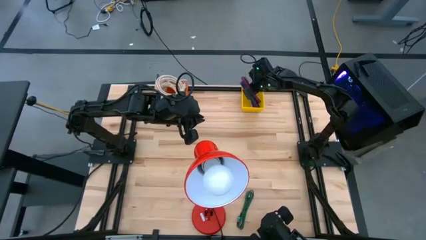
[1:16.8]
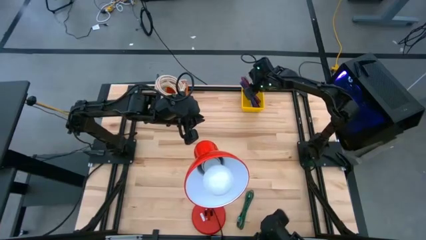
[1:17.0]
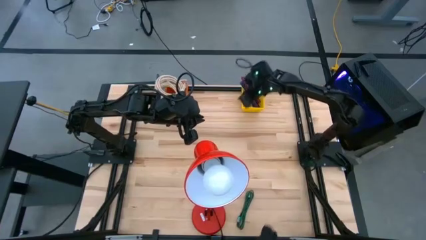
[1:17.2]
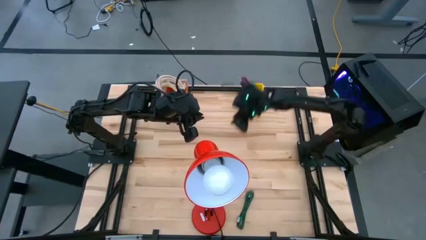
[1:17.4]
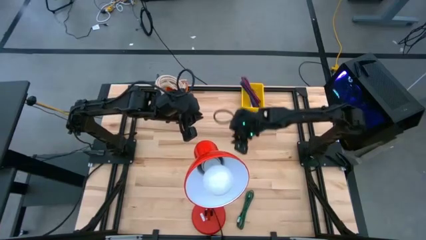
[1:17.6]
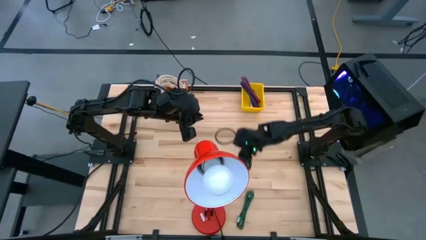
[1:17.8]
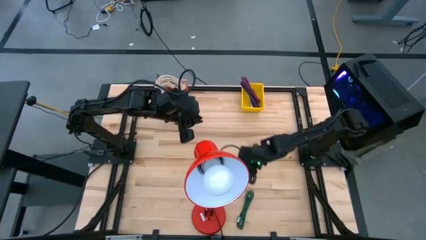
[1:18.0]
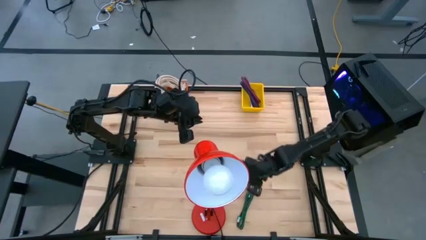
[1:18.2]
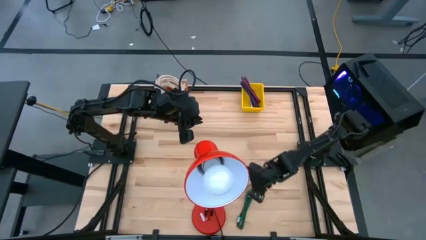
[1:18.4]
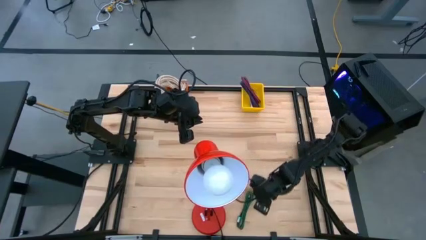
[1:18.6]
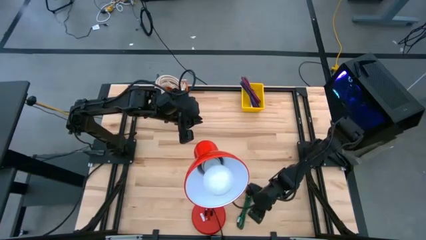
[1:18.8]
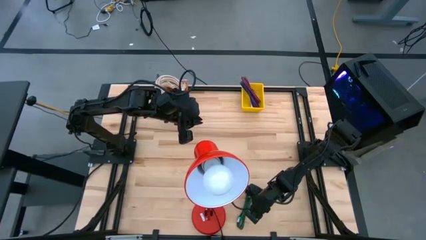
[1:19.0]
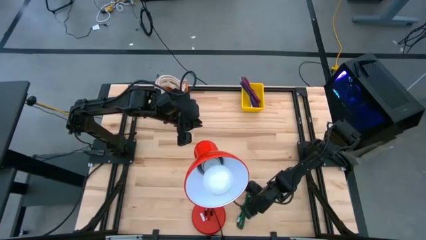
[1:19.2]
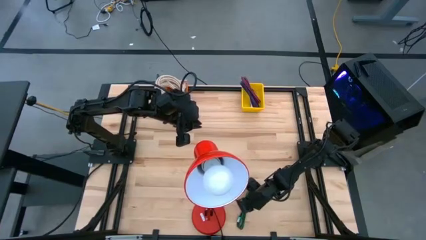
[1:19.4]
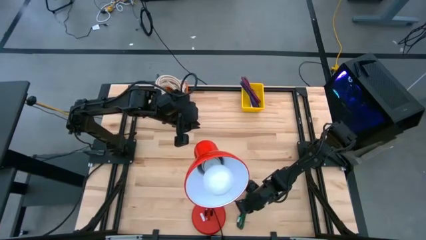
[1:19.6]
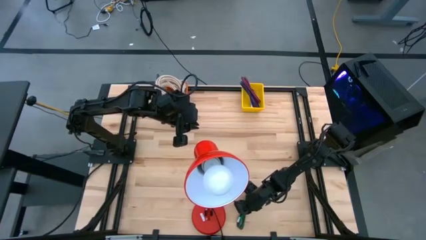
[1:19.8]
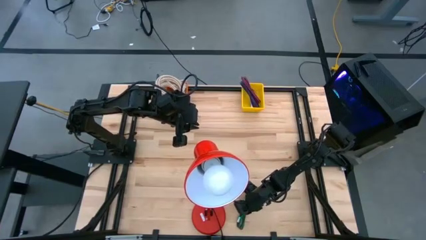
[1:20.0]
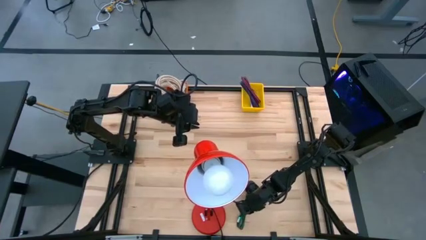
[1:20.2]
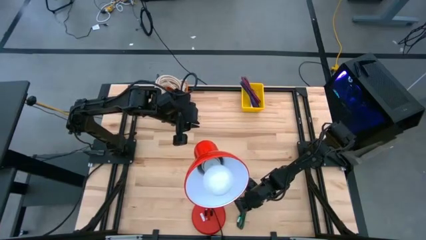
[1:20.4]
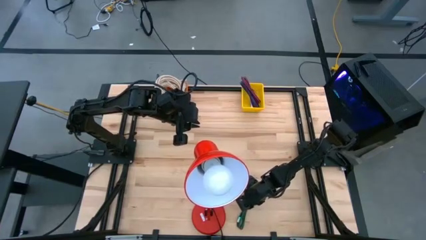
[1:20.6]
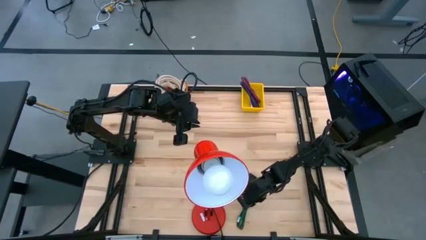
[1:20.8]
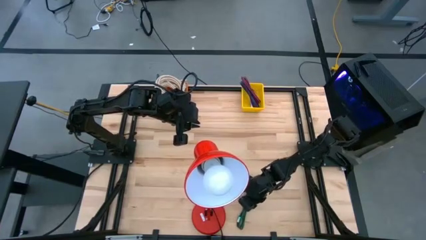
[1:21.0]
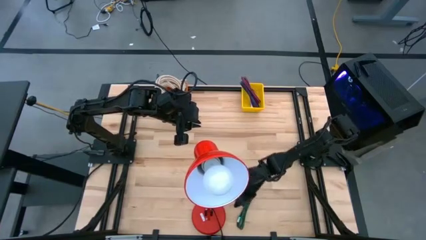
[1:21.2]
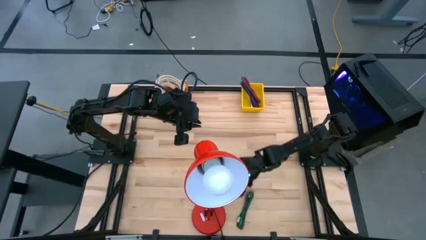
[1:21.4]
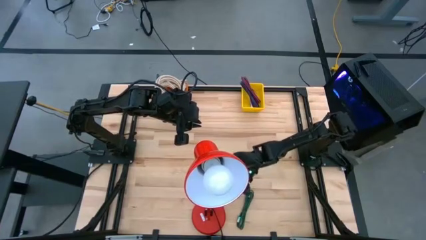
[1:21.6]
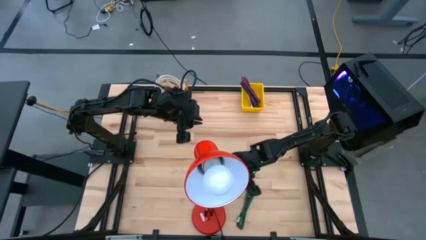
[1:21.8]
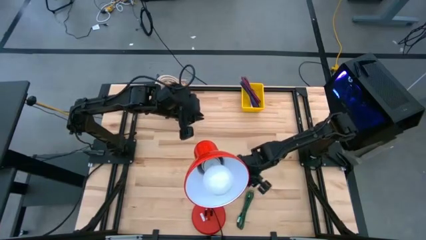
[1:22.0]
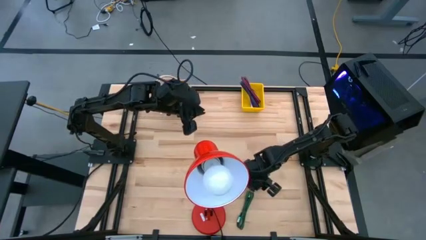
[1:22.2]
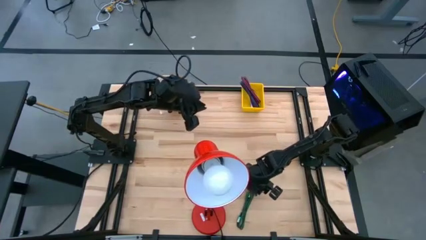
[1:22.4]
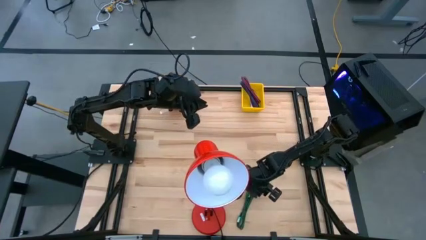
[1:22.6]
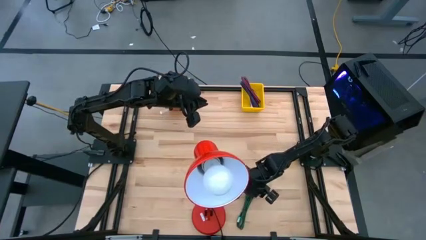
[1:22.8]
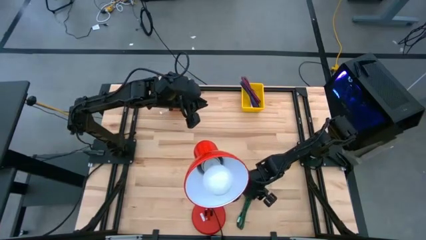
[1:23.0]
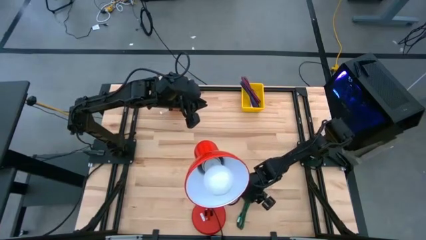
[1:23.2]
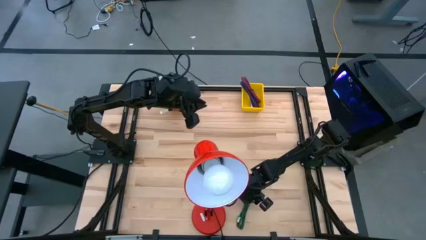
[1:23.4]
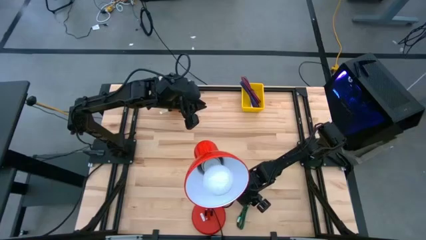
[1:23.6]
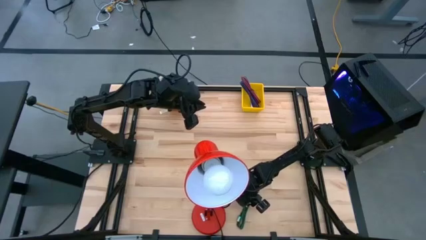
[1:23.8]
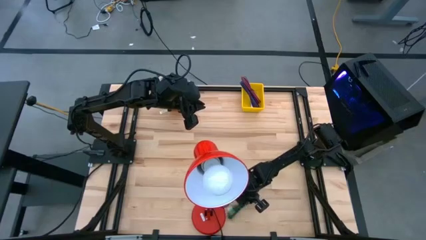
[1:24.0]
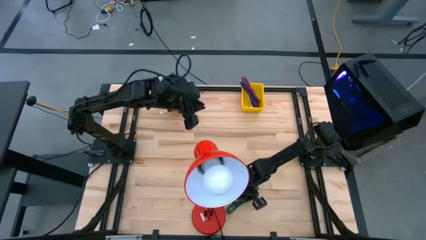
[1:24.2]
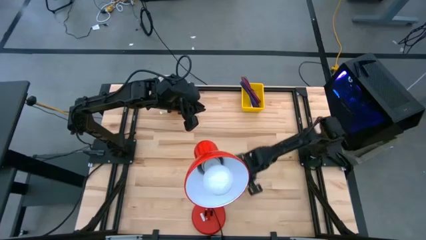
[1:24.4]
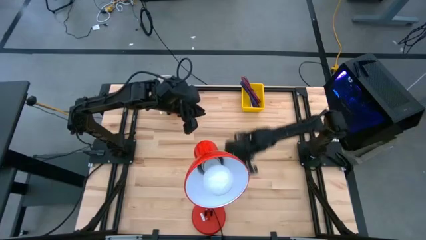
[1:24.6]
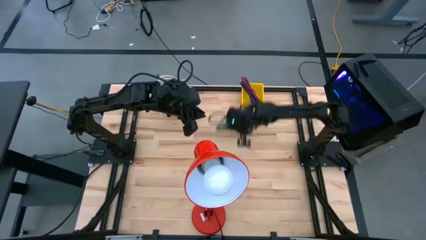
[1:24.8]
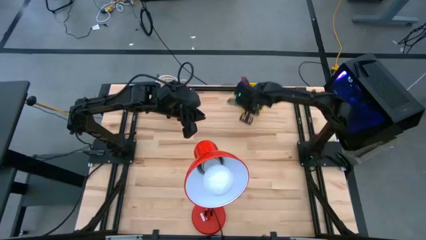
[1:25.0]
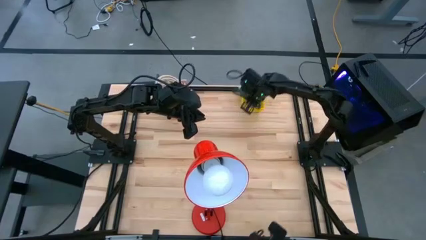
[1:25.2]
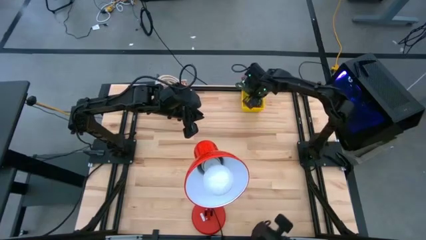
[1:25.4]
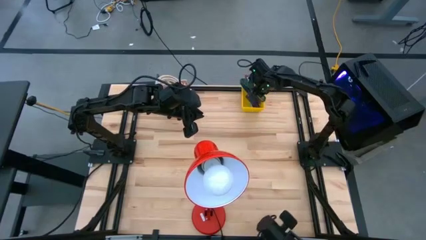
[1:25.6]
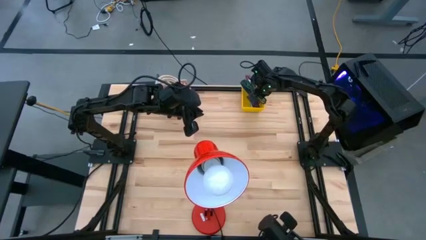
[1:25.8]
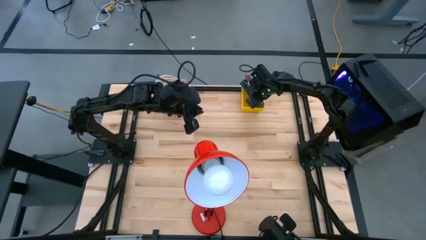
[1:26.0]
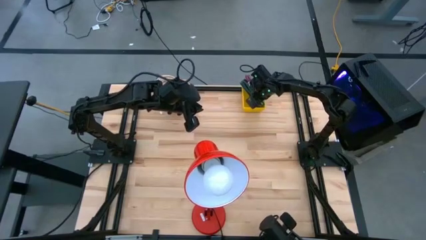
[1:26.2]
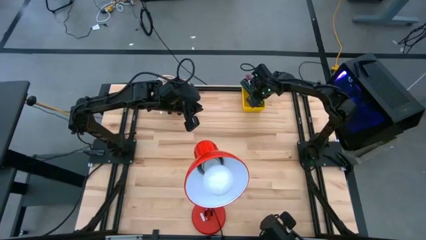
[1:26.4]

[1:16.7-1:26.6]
Task: Pick & Place USB Port
Put the green USB cable into the yellow bin

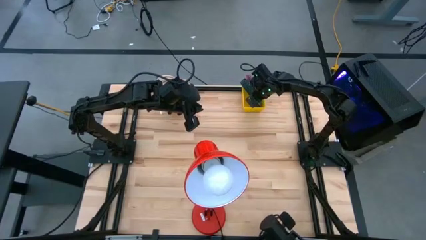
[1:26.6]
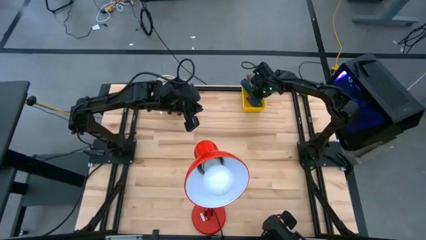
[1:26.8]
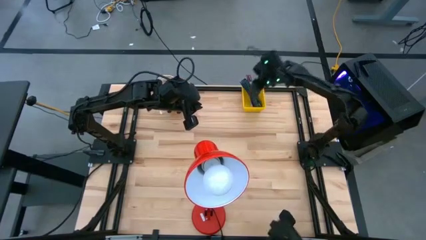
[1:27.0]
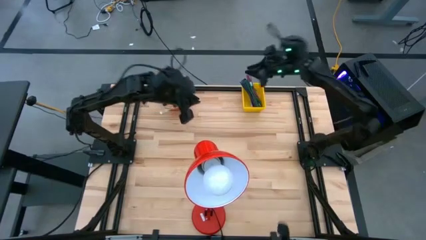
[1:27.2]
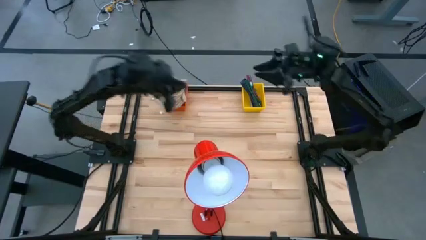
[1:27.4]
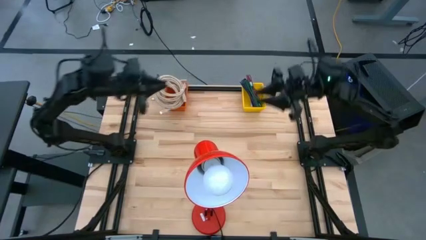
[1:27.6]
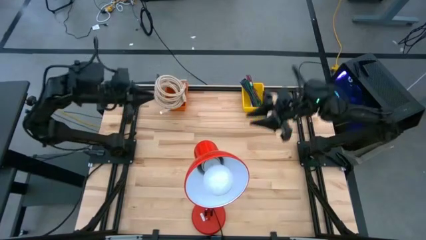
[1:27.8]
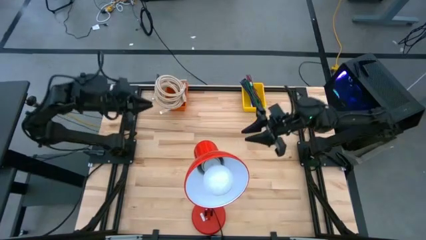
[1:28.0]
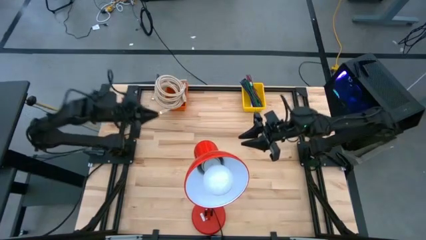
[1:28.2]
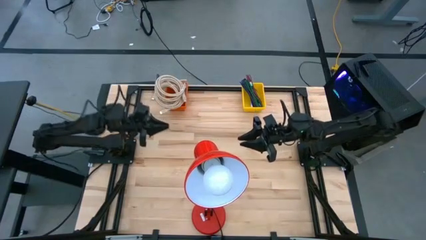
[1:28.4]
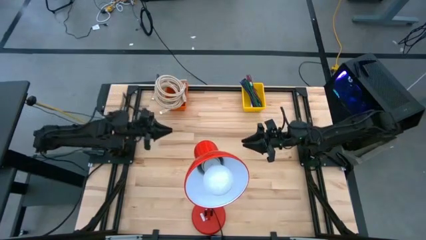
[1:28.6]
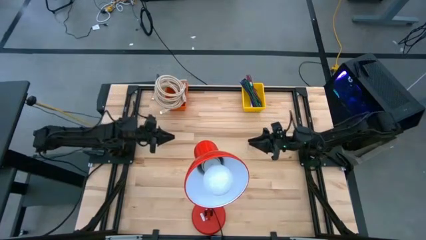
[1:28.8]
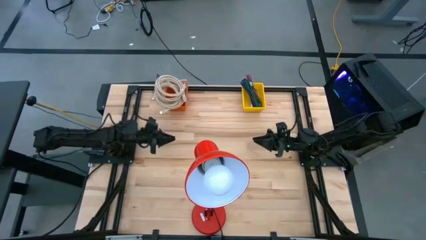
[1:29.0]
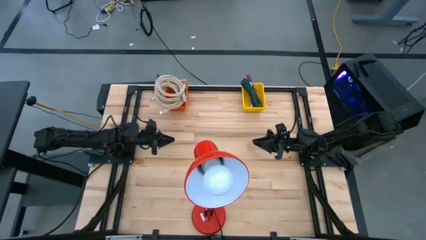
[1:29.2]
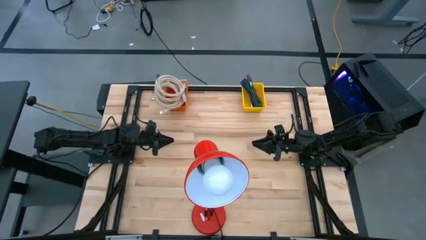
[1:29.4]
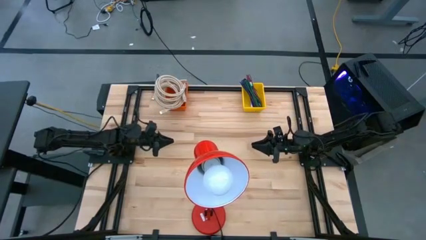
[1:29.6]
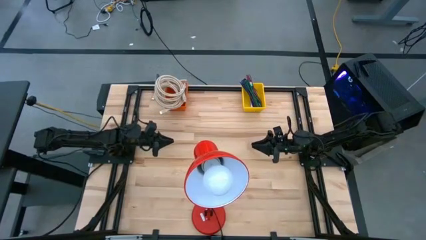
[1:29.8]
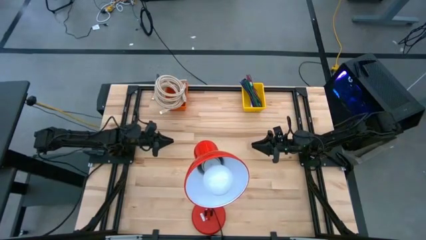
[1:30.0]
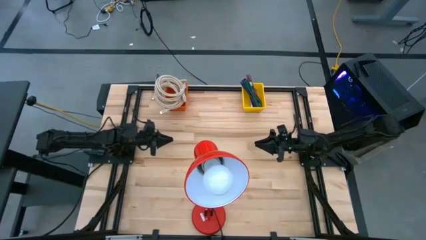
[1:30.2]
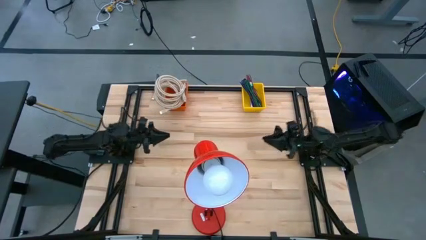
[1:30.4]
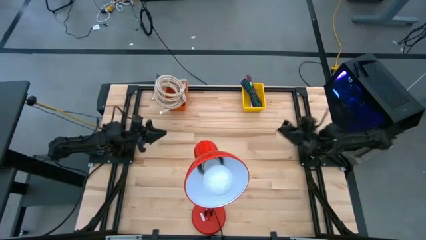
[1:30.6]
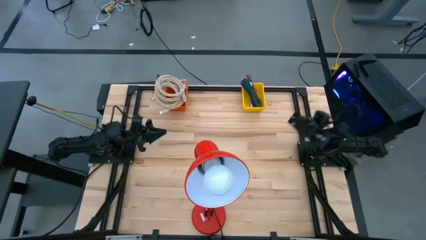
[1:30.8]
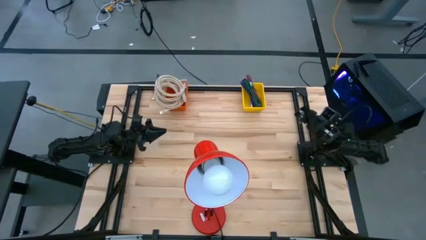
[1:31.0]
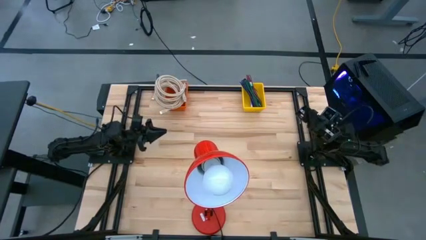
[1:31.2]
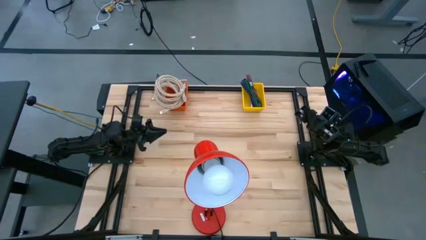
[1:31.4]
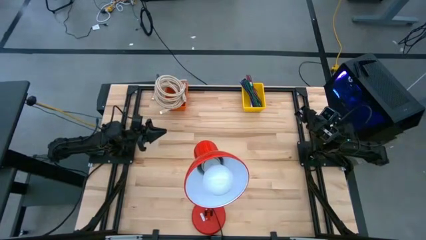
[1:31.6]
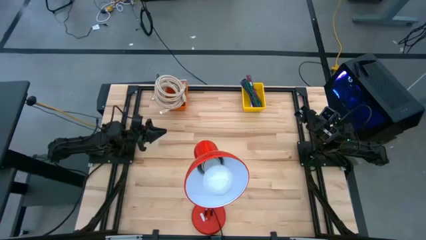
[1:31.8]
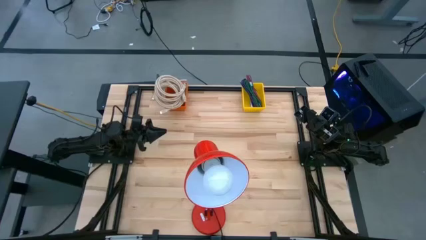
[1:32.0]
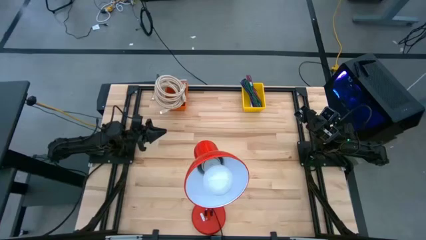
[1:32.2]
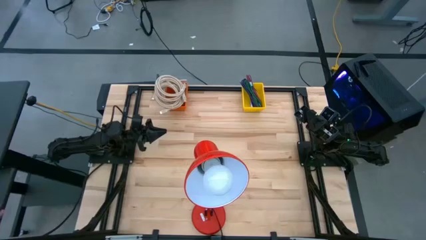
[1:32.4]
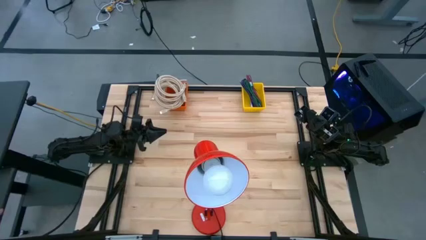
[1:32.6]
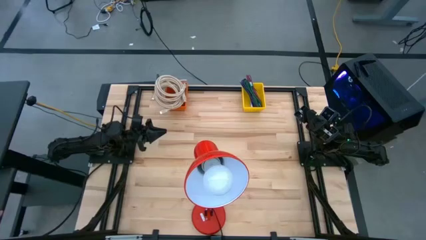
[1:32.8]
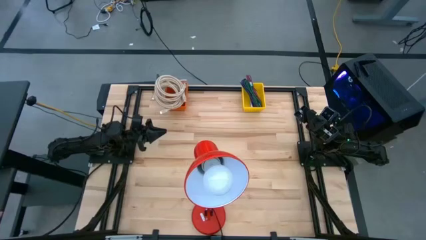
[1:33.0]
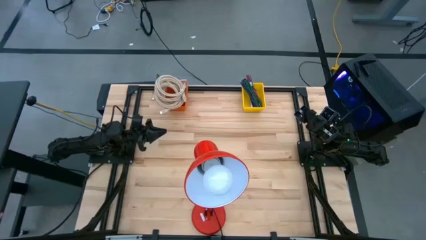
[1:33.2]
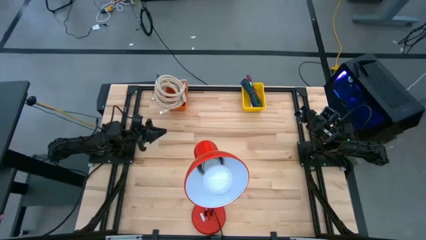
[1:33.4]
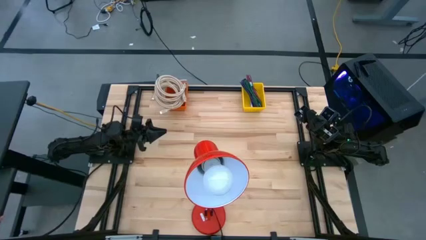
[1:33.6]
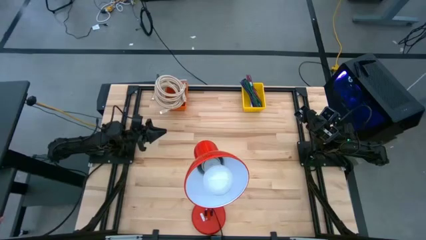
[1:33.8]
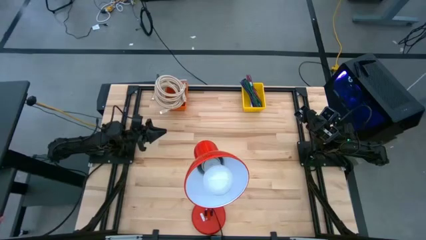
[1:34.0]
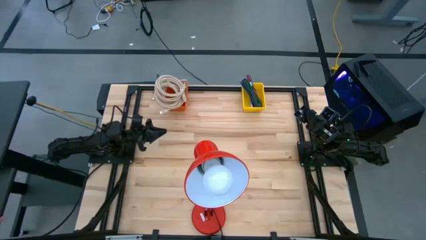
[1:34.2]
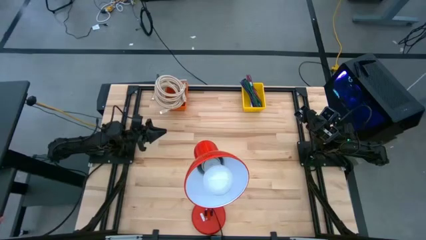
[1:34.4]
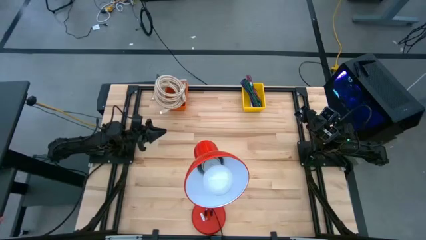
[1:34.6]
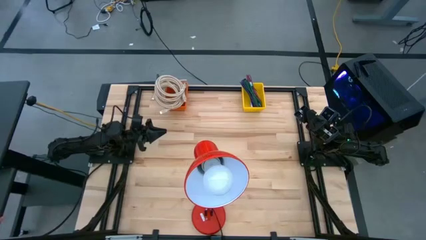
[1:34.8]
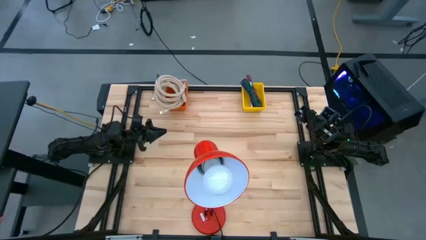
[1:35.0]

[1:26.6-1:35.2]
Return to Home Position
